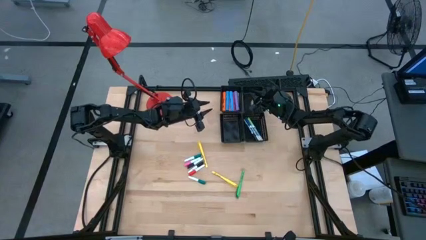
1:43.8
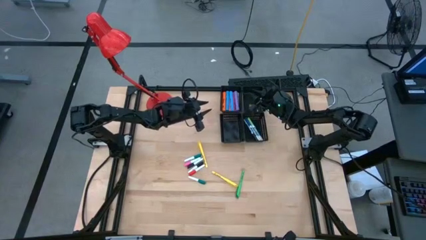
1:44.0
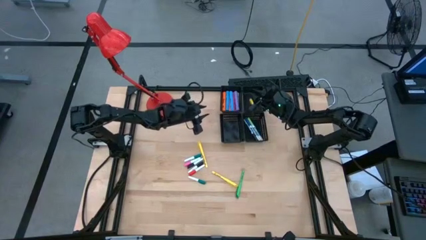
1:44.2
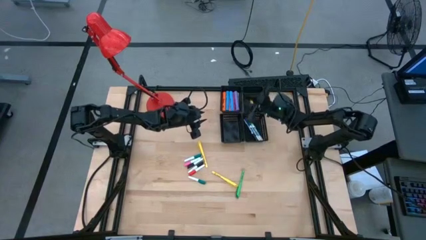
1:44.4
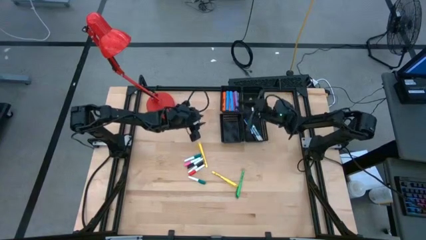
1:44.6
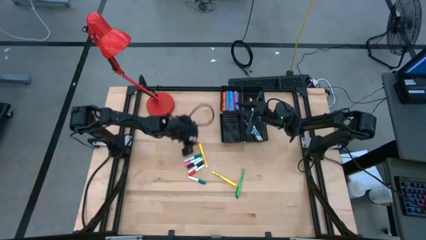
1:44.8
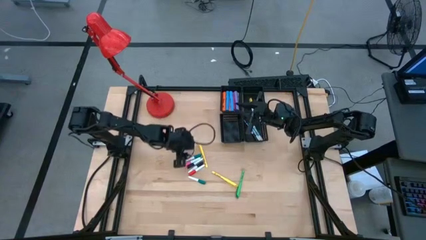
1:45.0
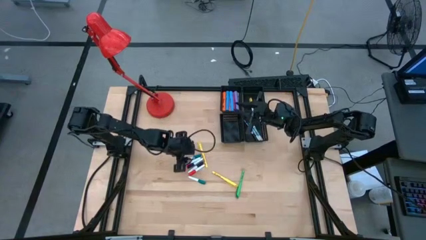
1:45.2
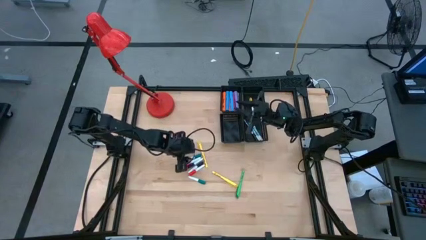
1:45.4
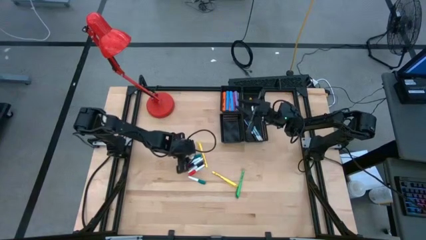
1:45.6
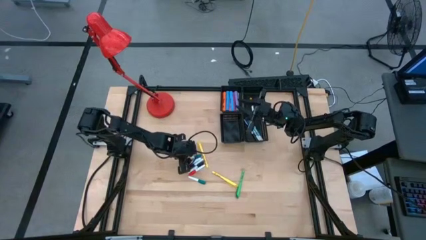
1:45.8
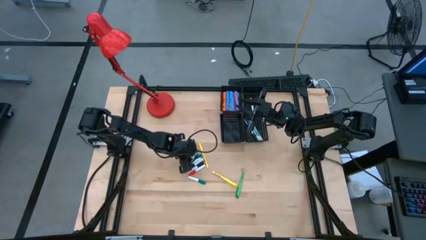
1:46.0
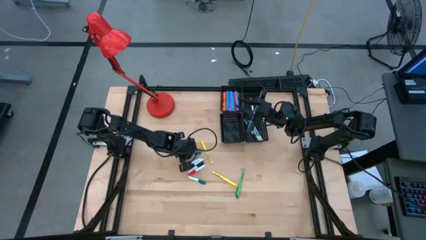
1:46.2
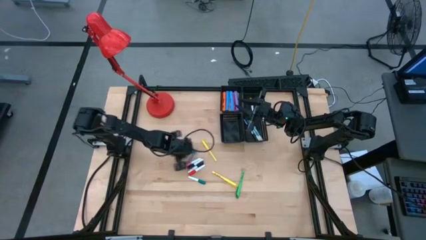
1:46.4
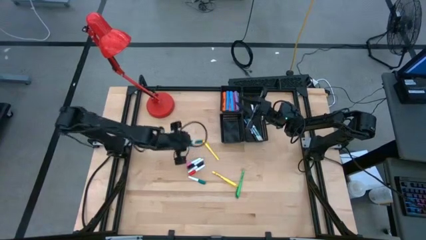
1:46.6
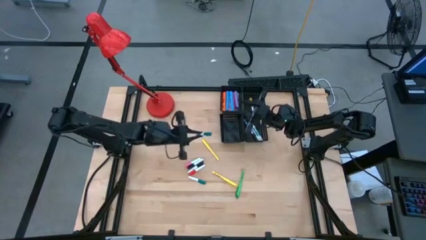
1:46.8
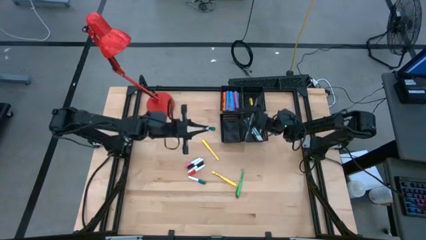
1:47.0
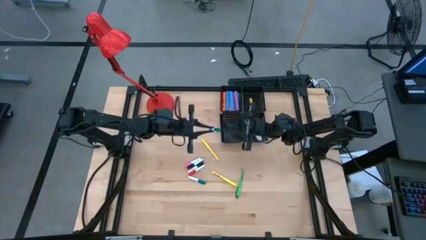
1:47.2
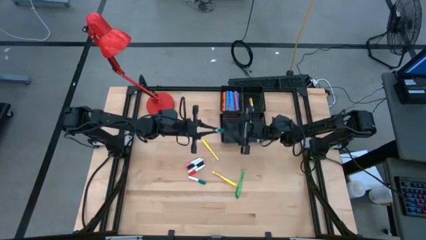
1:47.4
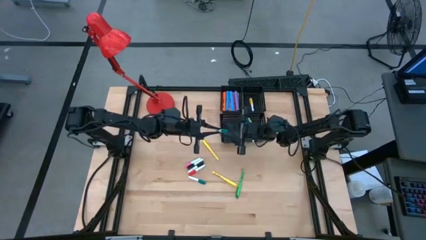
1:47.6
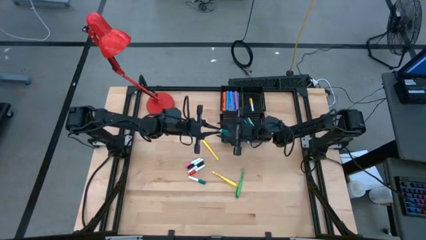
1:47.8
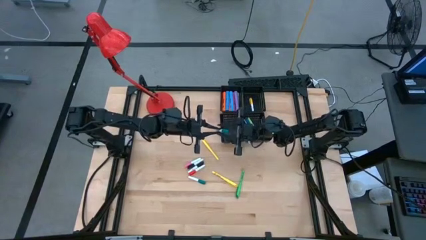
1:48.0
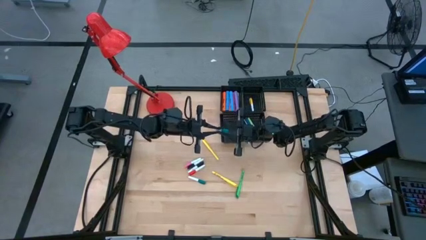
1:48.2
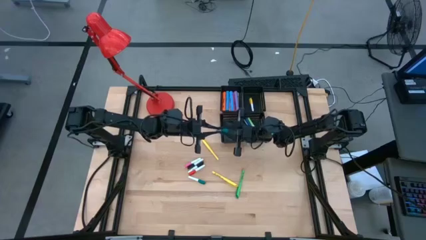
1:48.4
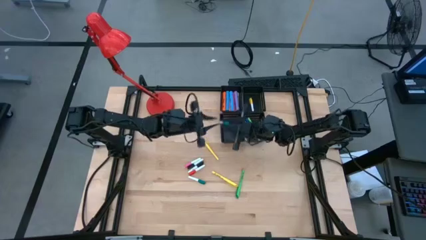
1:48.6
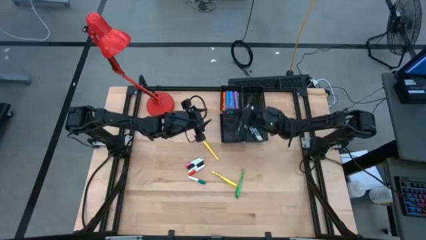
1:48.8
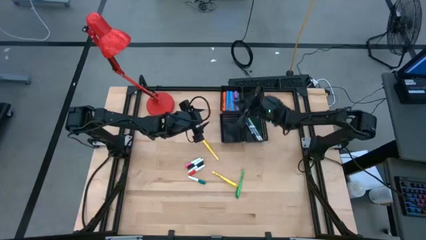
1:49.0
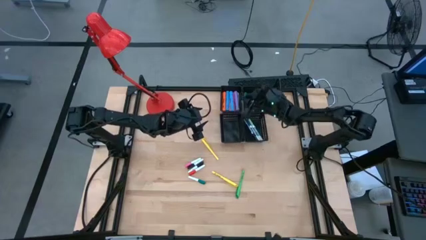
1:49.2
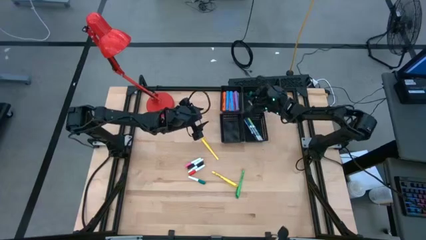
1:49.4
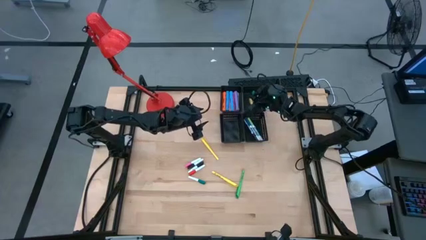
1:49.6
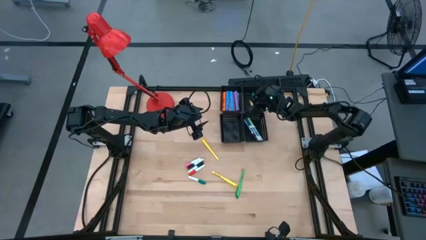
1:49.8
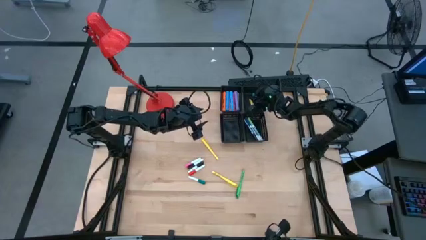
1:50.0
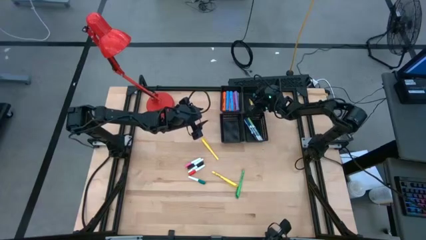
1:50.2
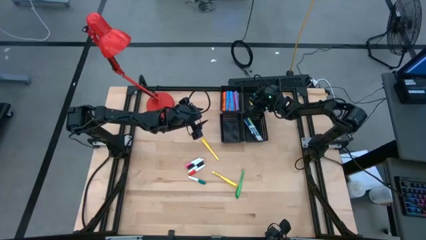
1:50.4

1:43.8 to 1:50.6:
Task: Pick & Place Markers
Put the green and white highlighter pen into the top right black bin

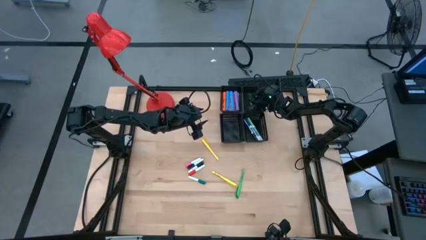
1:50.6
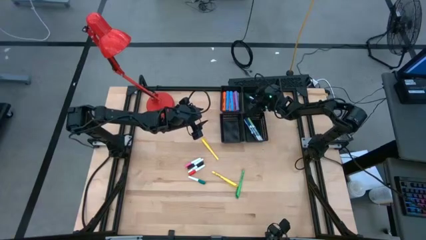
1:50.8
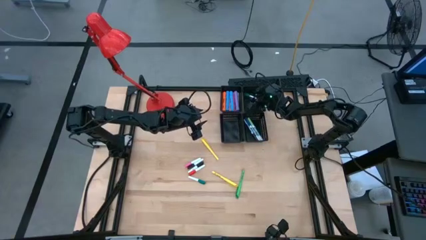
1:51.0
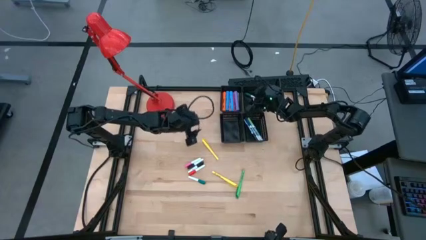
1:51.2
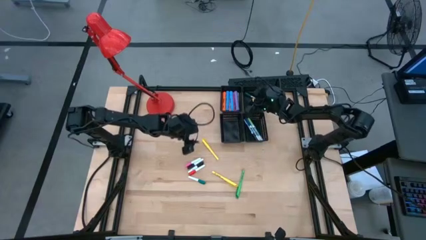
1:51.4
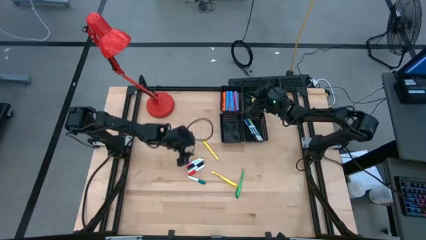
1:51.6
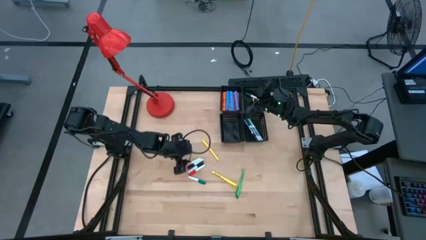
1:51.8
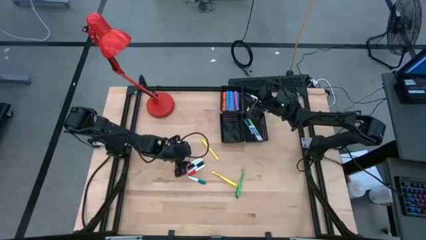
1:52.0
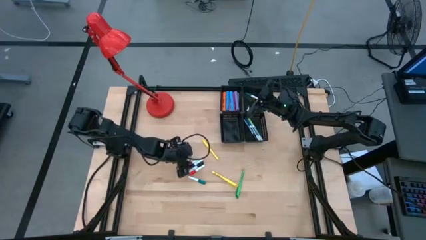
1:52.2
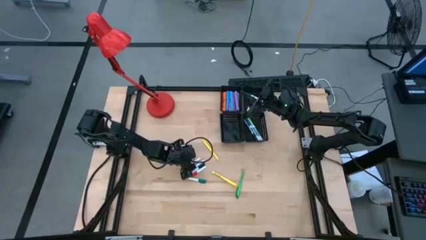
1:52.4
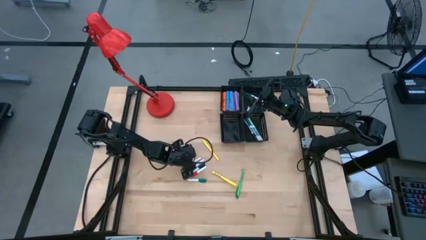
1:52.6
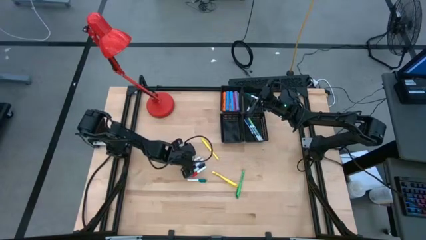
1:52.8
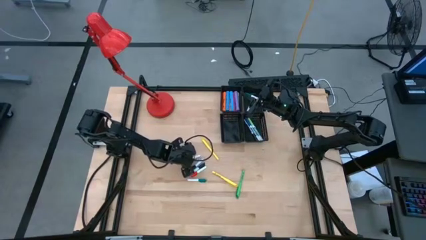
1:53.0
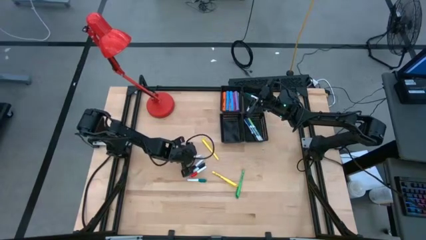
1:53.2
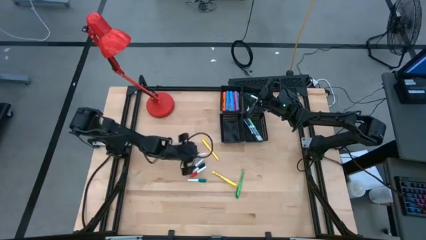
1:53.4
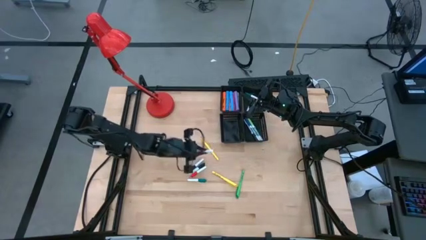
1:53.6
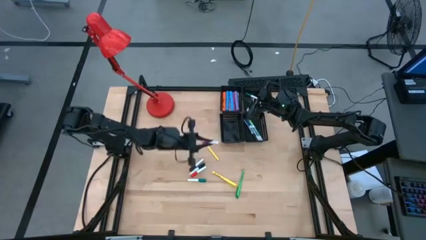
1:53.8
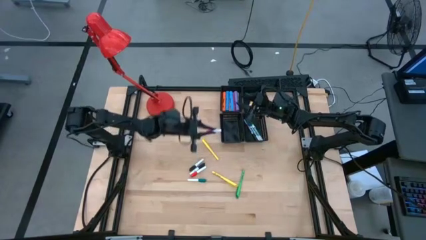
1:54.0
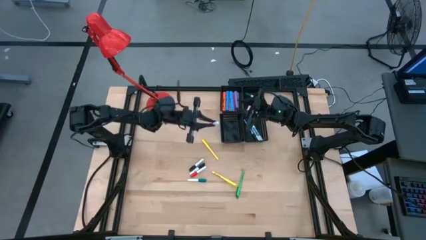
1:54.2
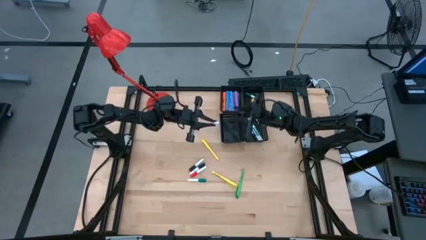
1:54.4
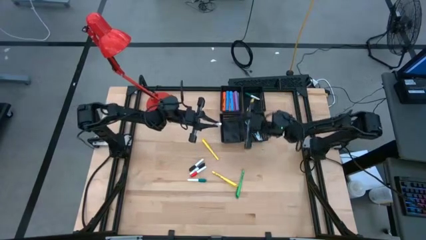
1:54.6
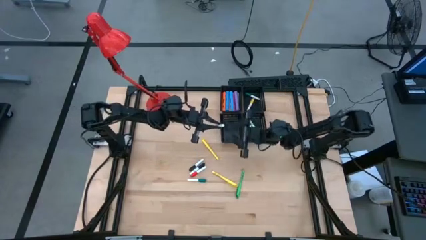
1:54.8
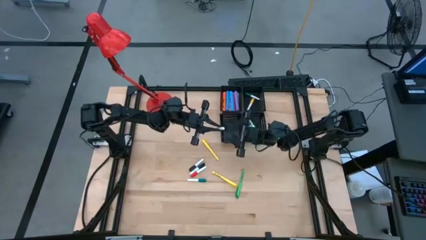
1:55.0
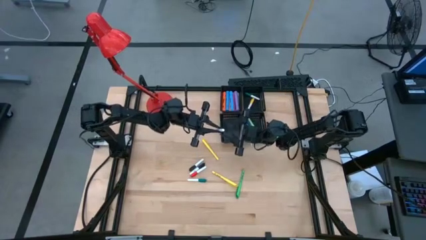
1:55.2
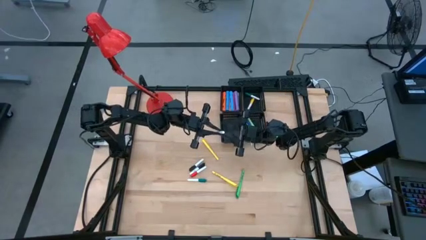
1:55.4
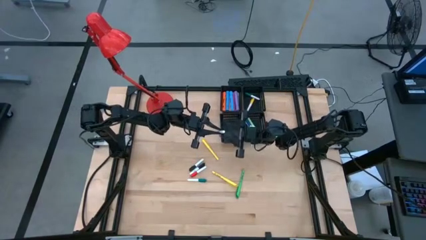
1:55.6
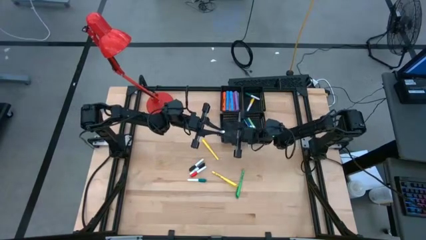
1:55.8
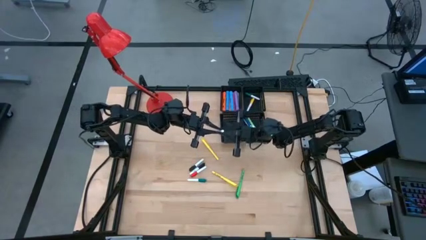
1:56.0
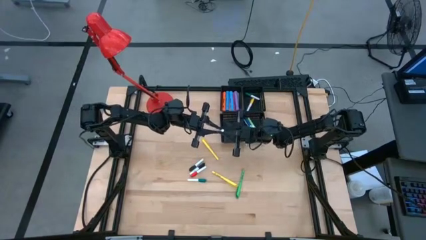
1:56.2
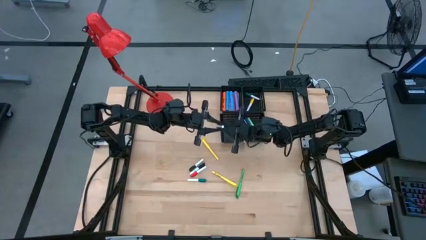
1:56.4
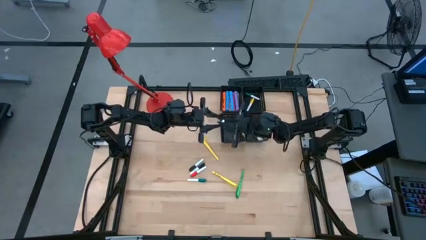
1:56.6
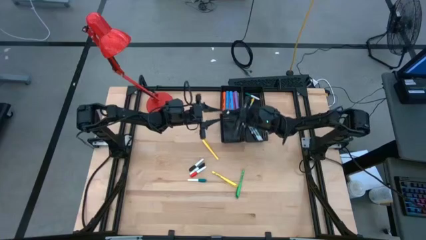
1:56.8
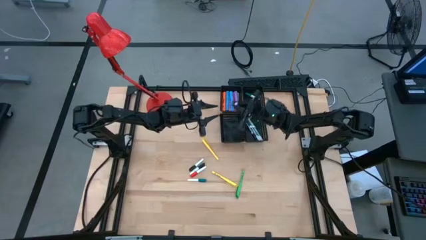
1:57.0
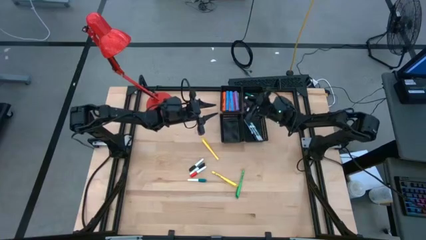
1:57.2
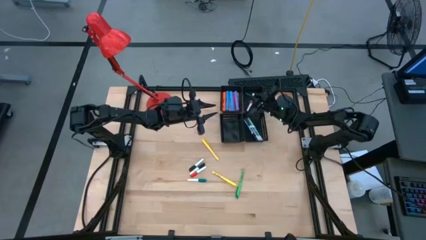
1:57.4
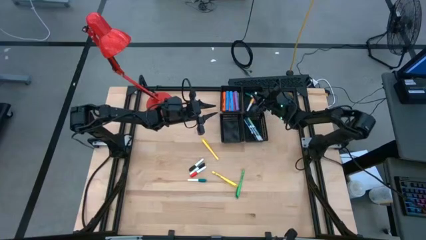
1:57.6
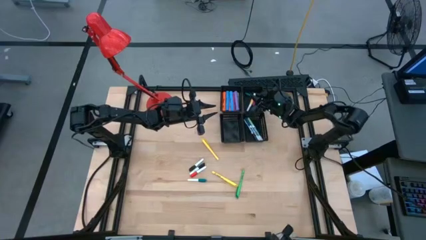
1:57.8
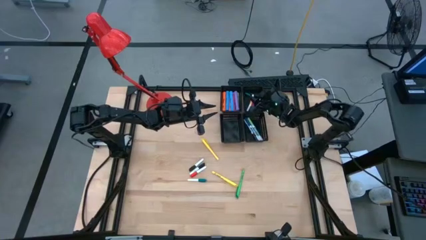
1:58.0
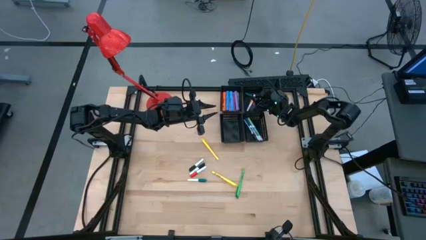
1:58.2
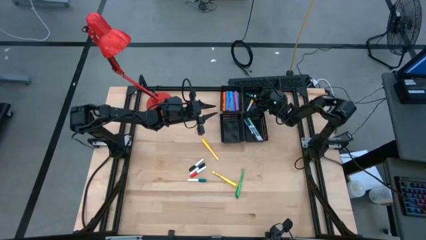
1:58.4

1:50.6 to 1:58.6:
Put the pink and white highlighter pen into the top right black bin

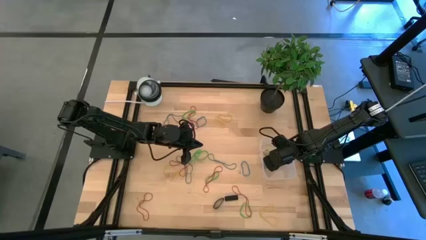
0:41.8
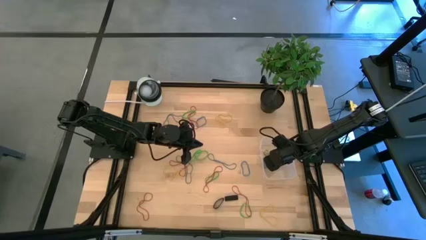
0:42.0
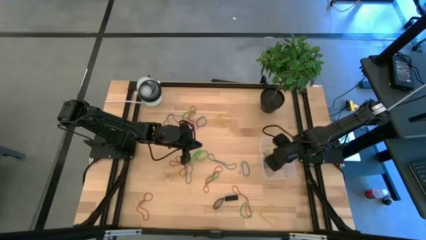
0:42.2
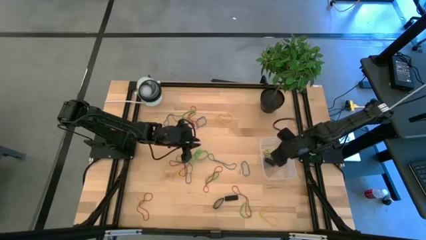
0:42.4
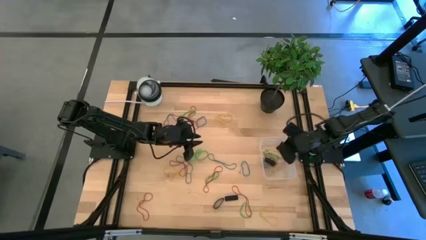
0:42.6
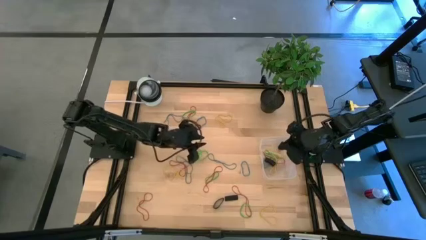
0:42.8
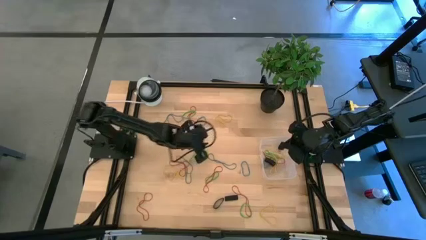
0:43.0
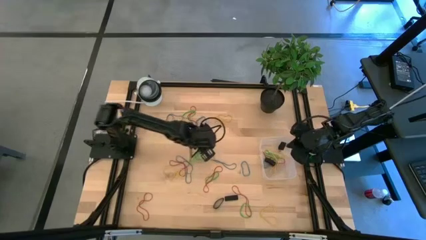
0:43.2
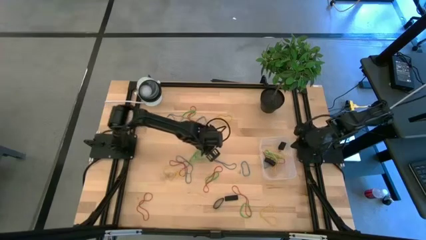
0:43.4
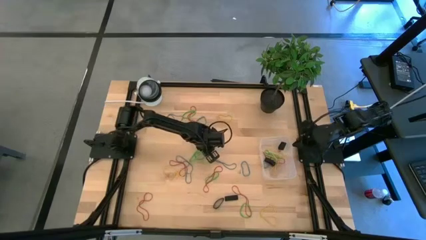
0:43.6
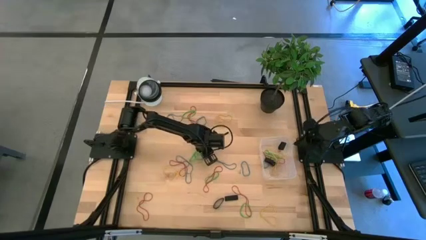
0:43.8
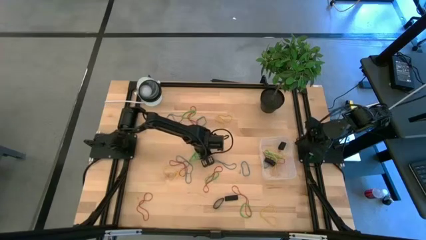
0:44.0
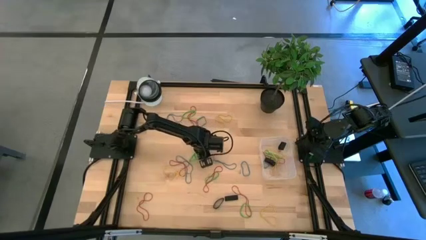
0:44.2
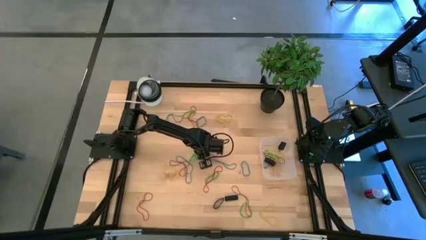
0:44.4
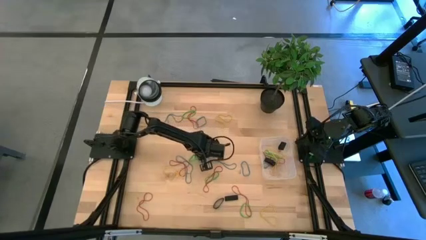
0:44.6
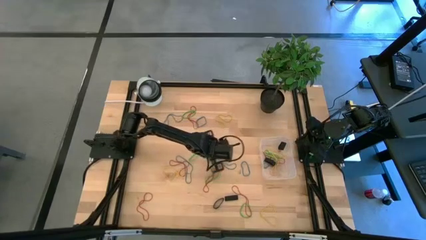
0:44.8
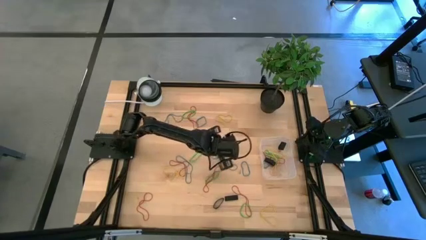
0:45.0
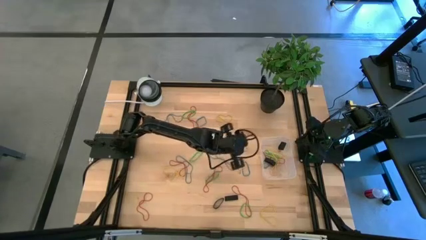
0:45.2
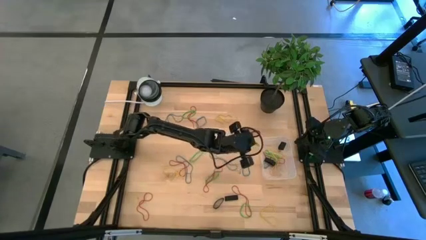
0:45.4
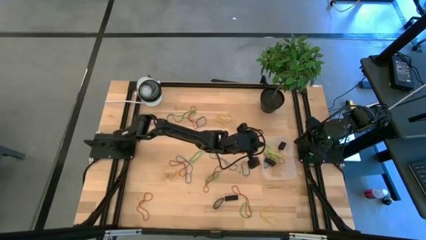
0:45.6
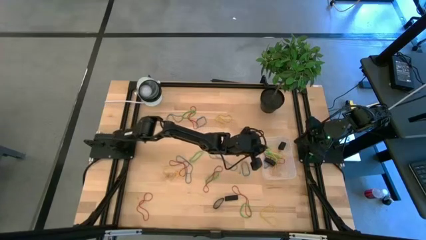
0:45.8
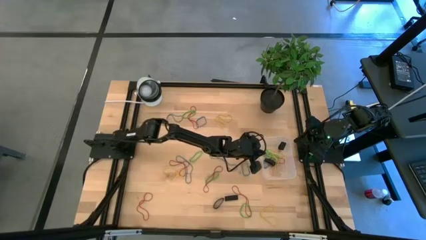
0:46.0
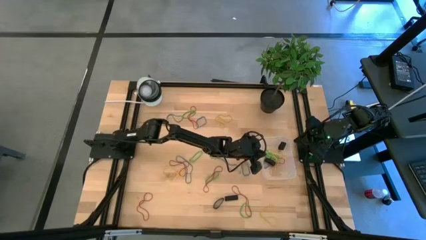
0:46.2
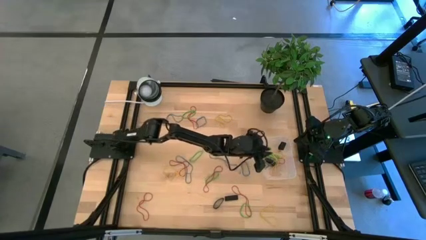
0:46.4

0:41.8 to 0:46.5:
Task: Pick and place rubber bands into bin
Put the green rubber band into the transparent bin
